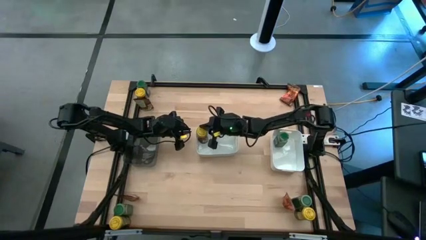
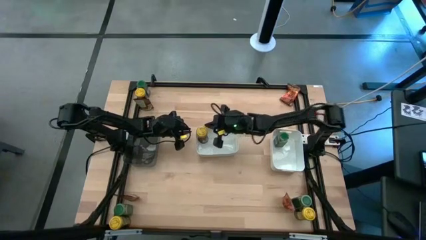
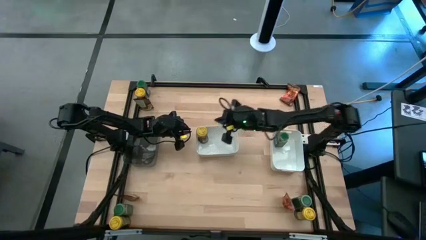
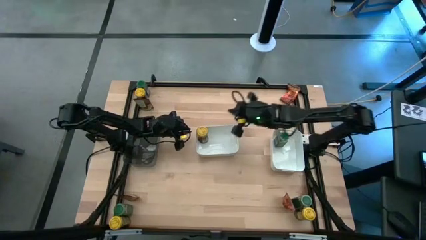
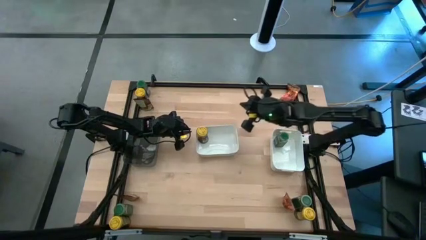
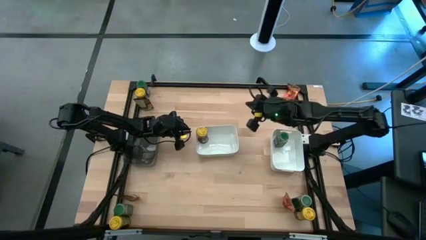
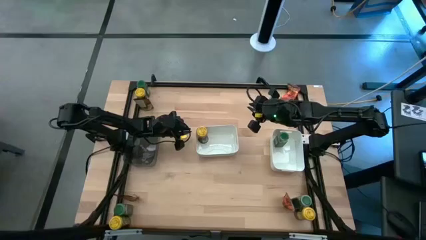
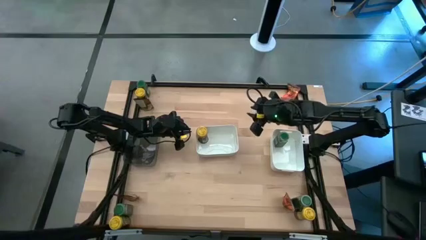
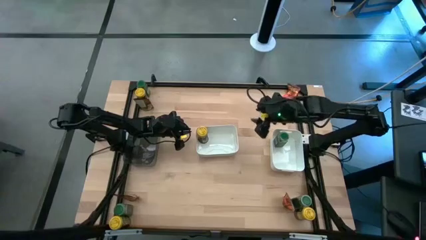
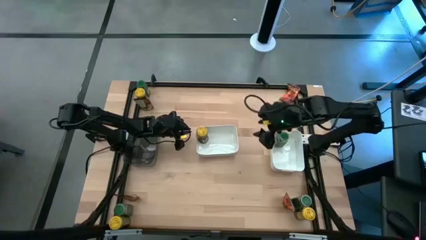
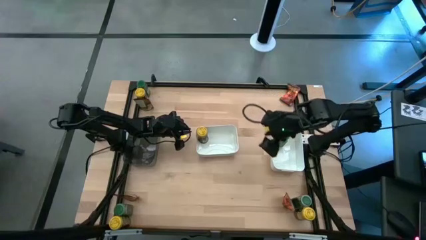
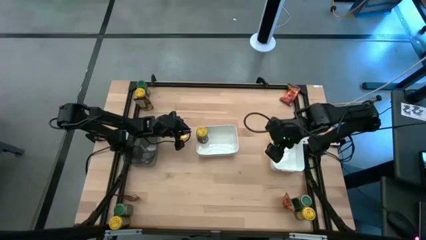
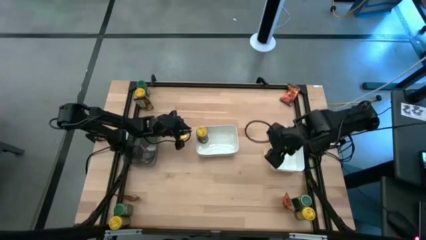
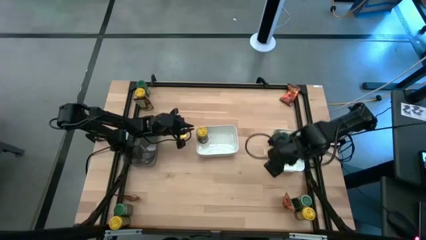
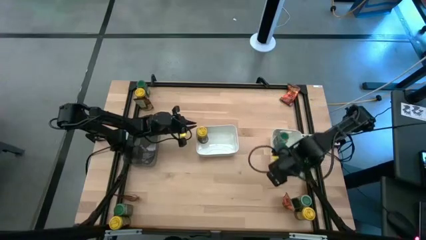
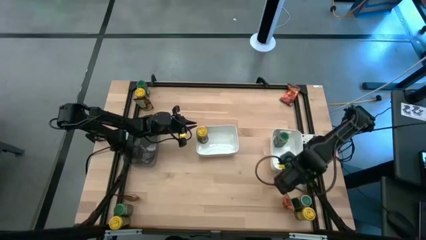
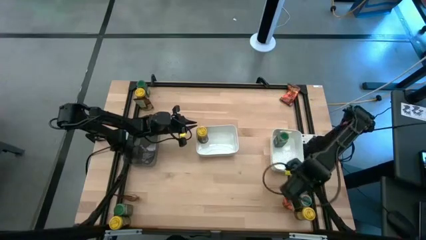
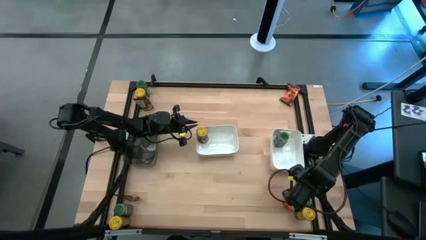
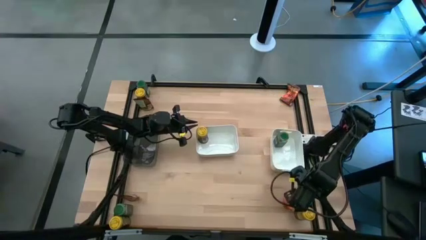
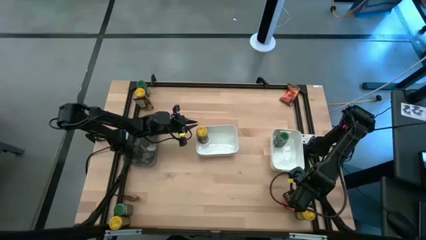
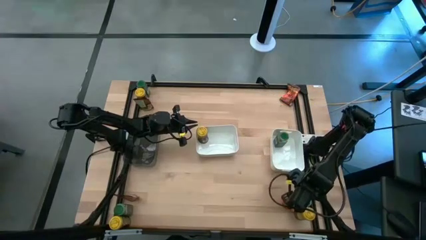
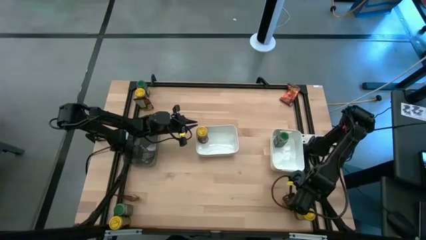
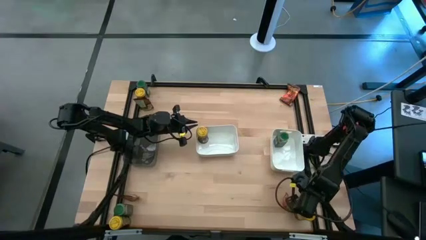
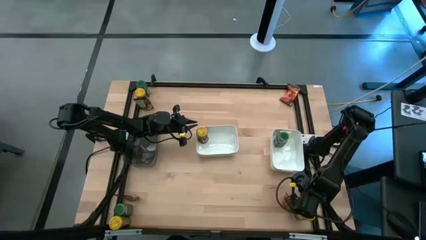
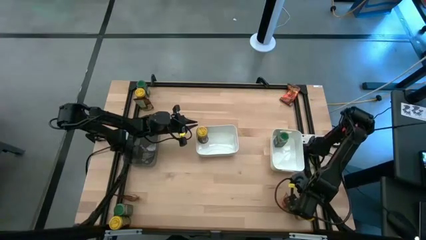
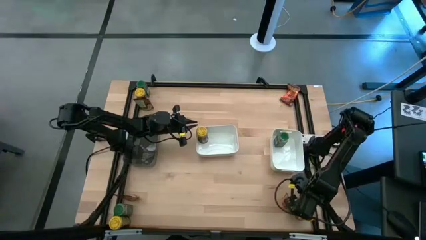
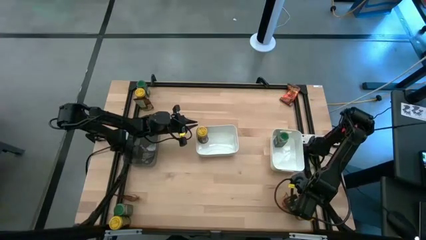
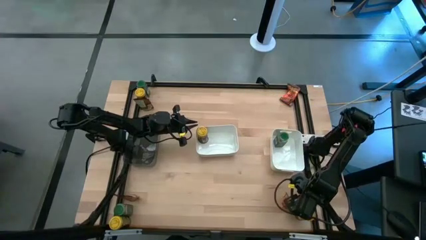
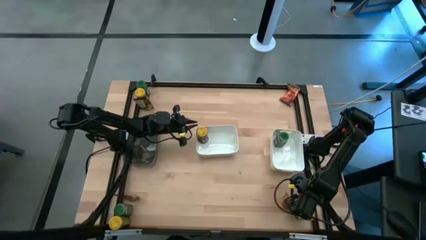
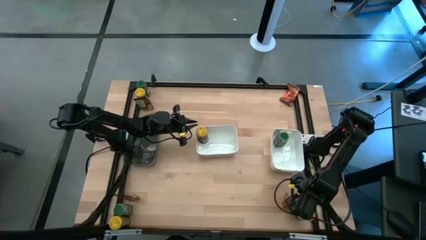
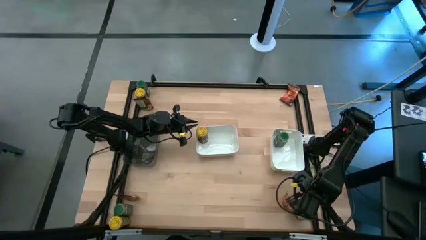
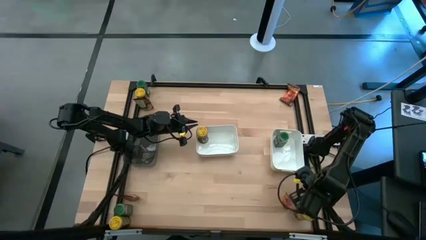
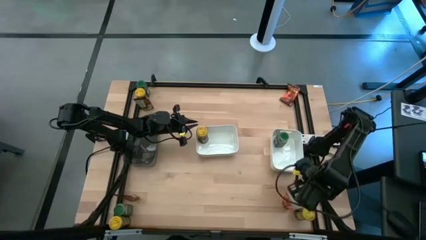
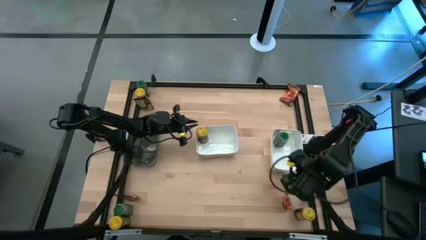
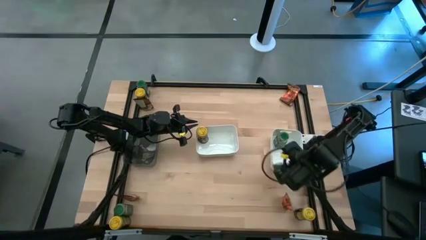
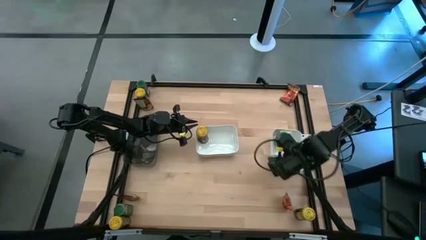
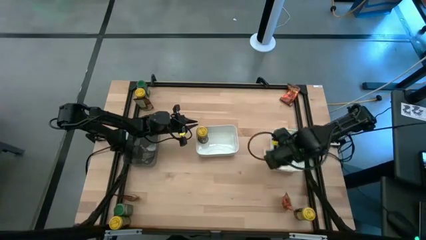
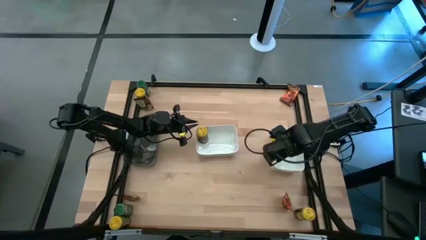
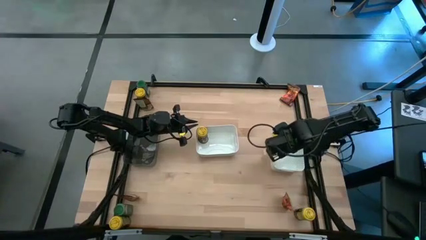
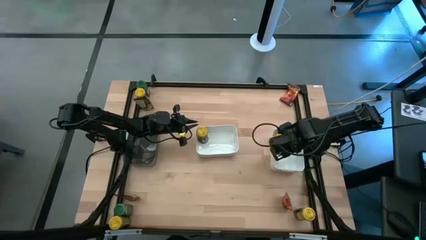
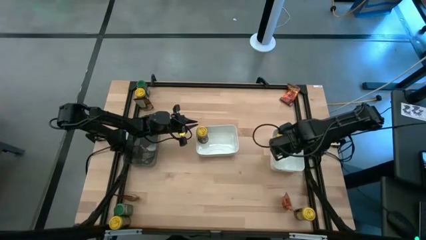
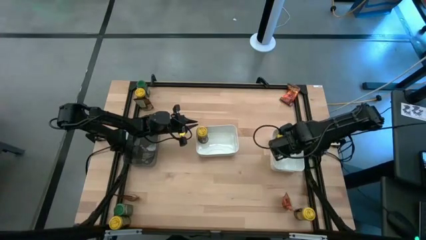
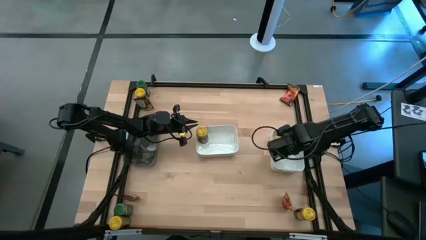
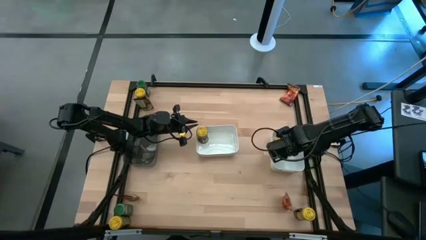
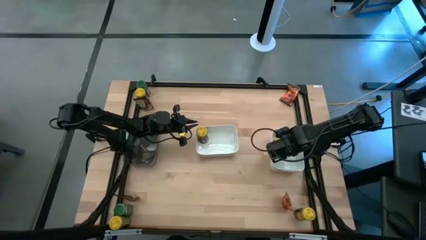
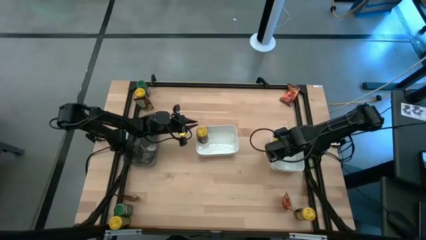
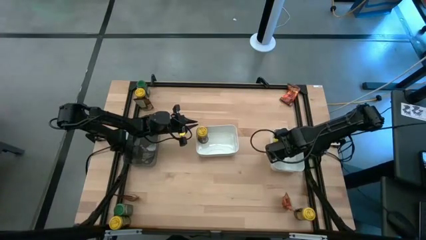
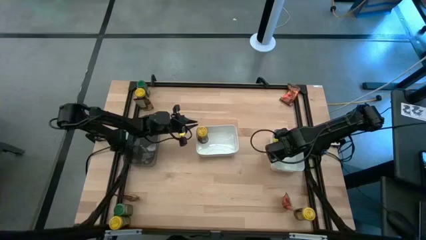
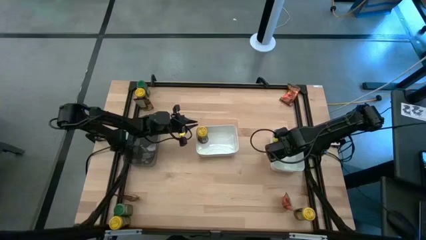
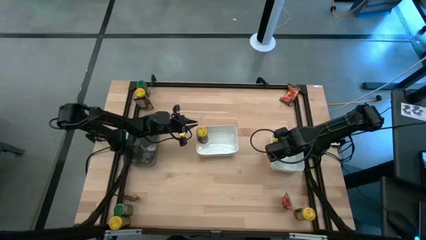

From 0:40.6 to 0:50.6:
Task: Sort spices by type
Put the bottom right green seasoning bottle into the right white bin

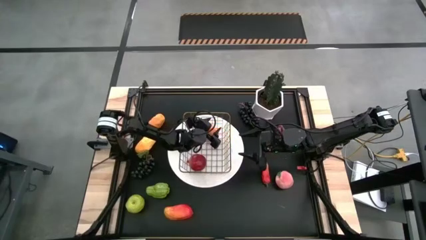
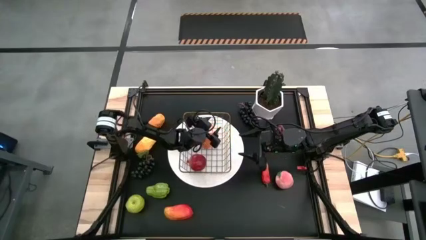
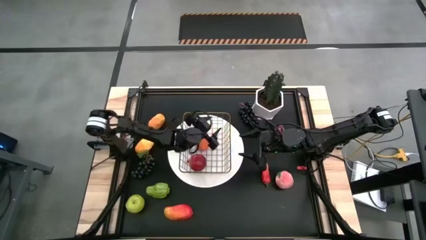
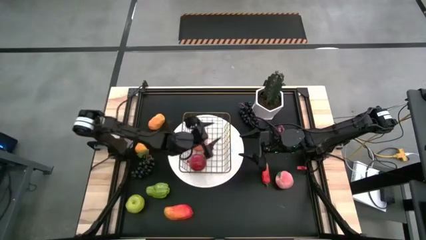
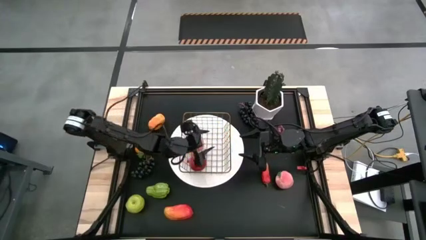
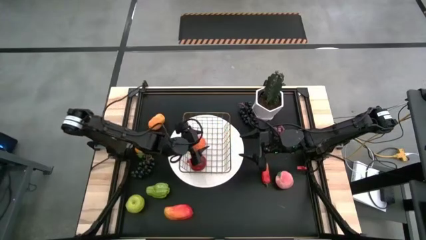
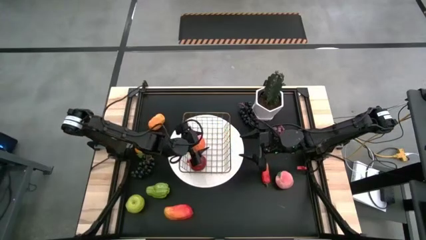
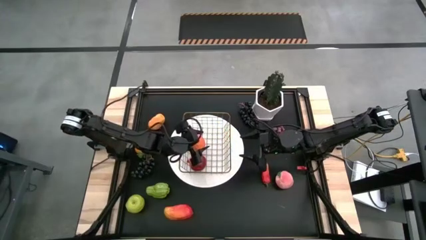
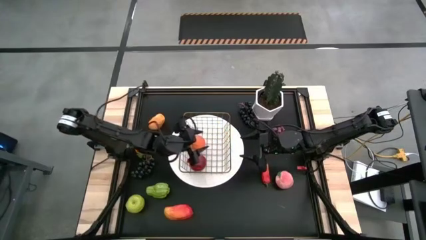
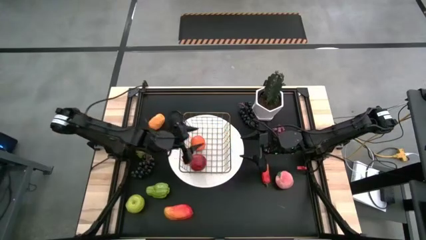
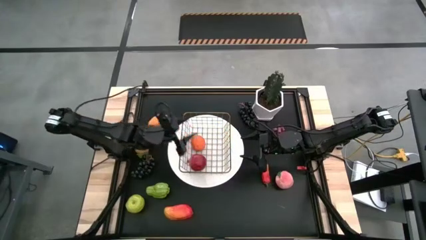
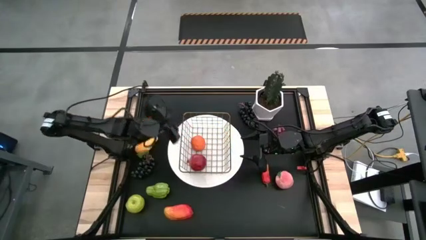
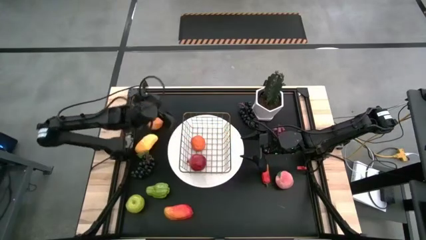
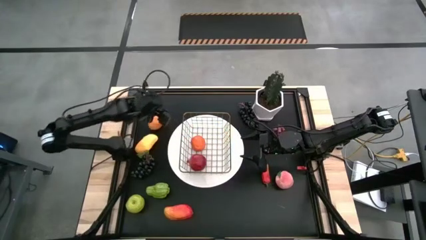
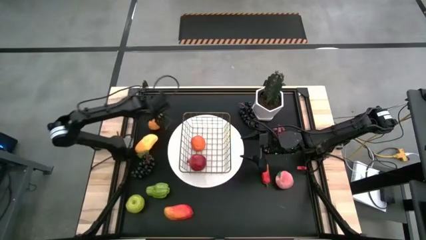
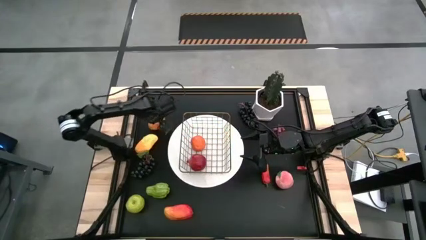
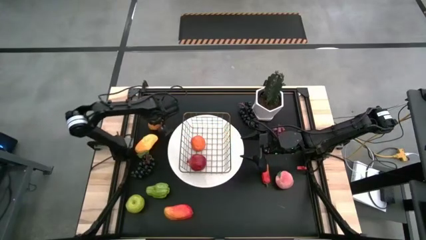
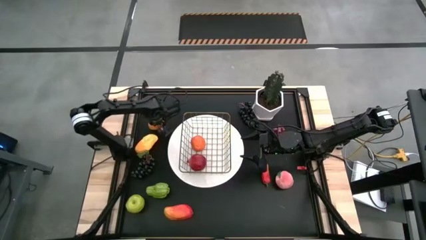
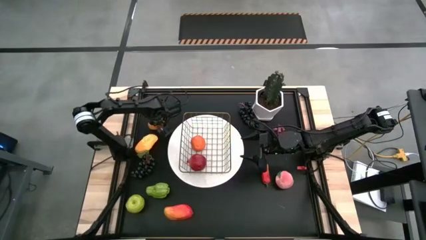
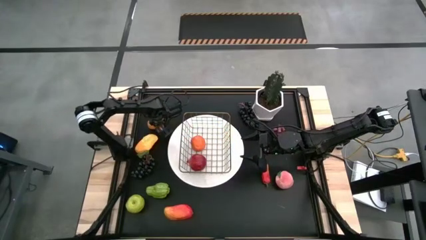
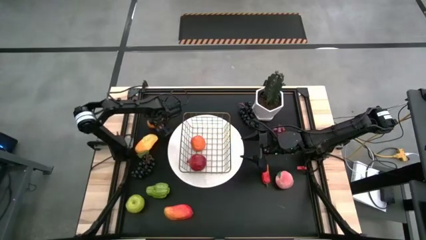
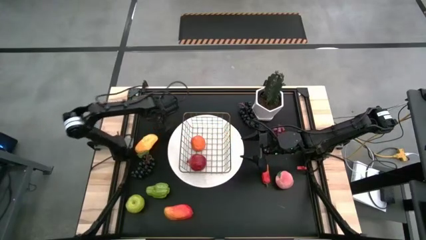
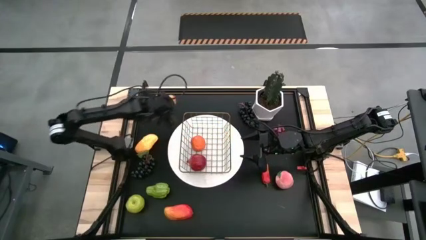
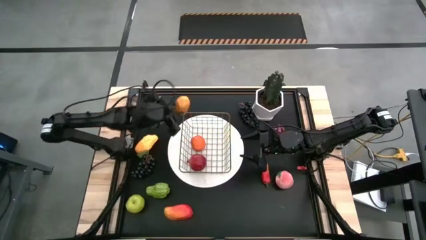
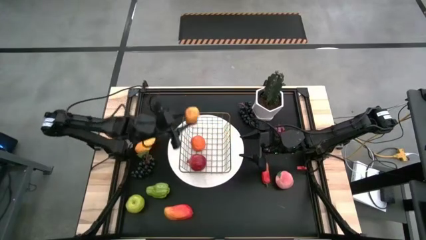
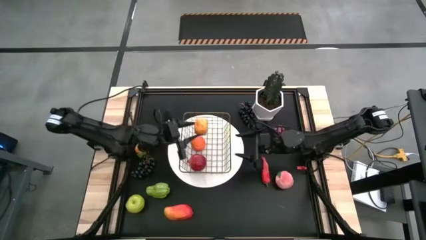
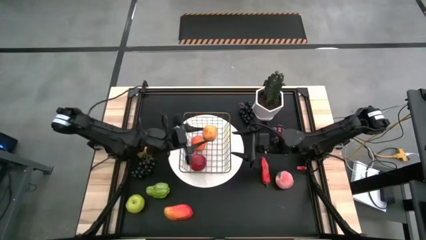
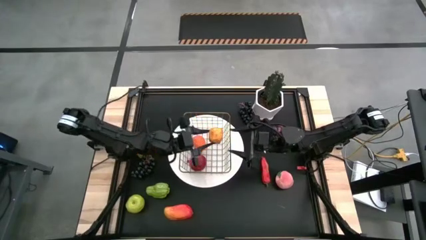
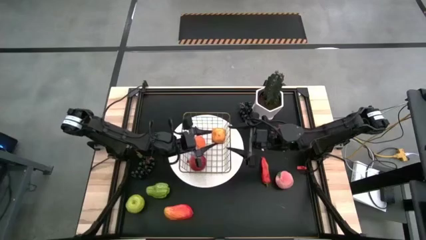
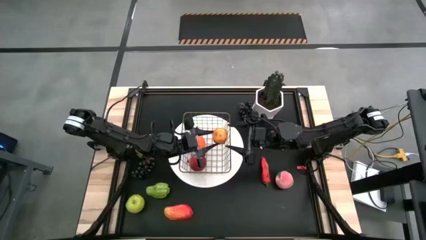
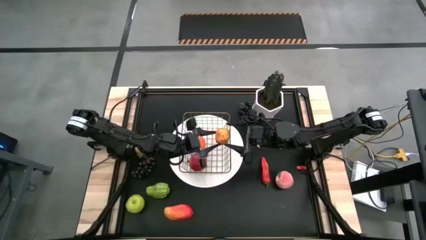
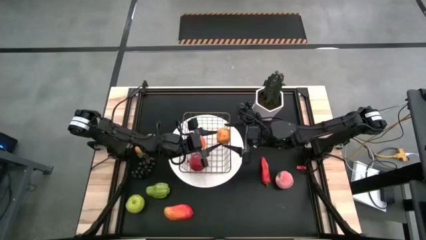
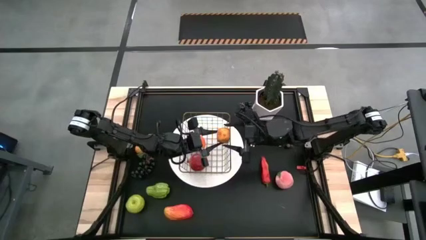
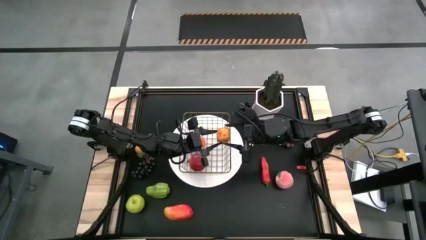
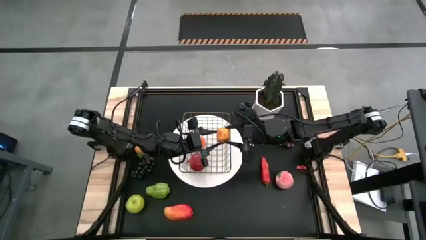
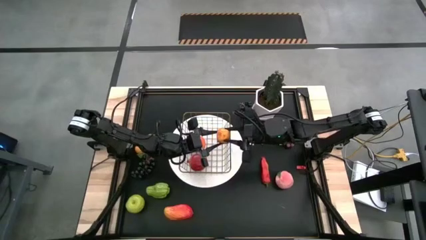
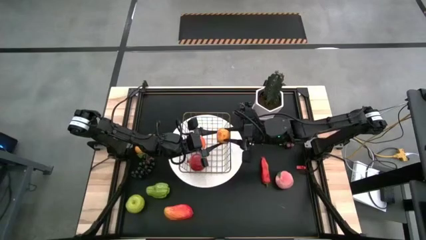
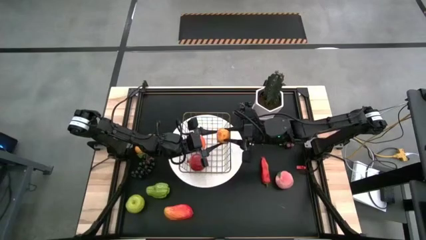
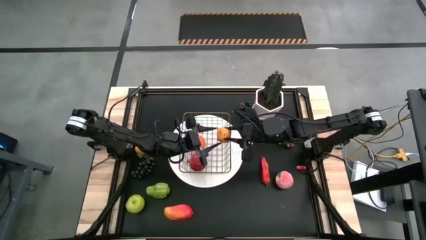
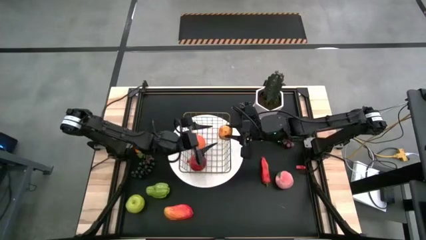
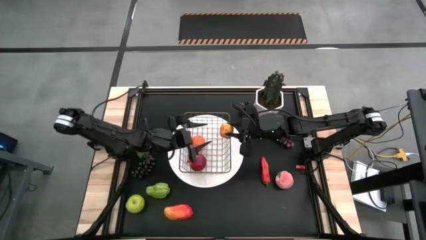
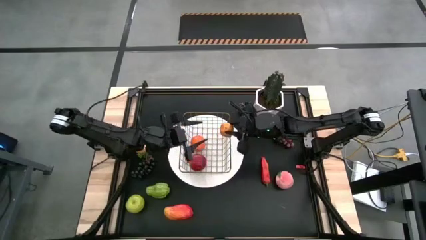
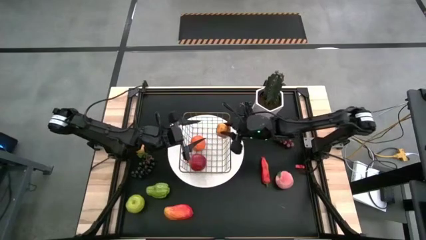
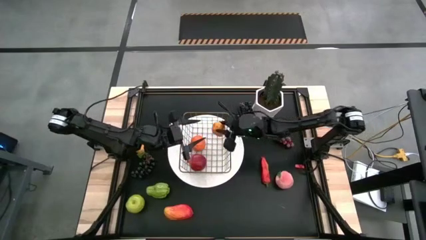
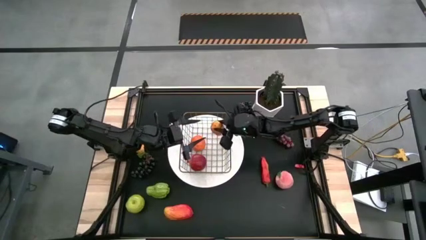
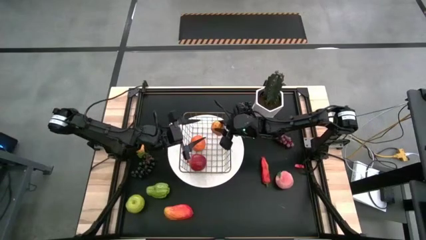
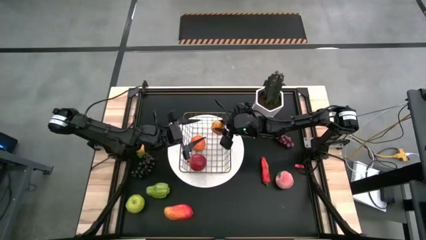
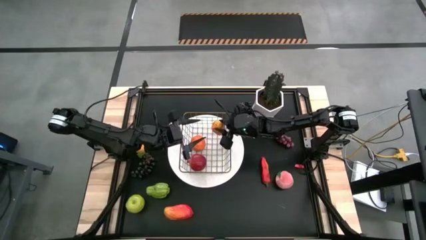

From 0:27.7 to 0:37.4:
Task: Build produce basket
Put the top yellow mango into the wire basket
